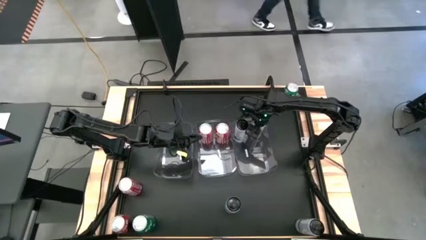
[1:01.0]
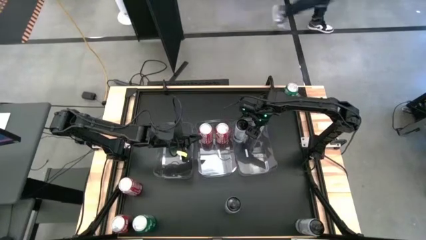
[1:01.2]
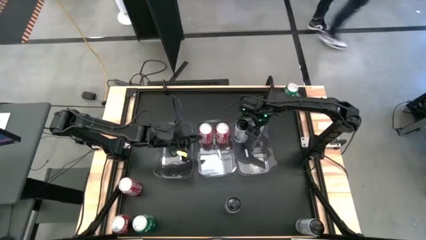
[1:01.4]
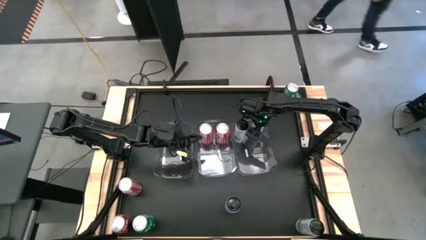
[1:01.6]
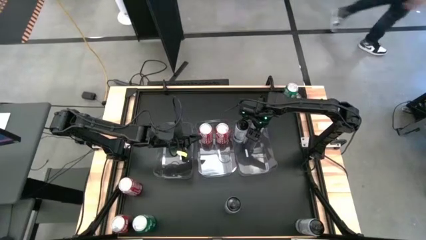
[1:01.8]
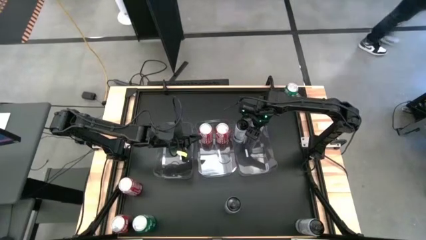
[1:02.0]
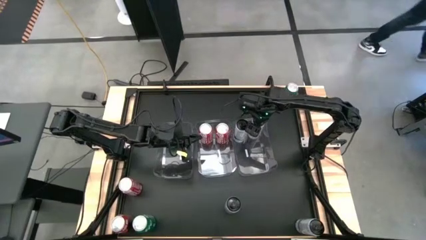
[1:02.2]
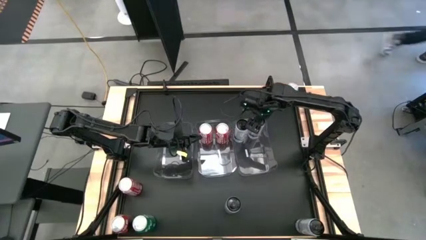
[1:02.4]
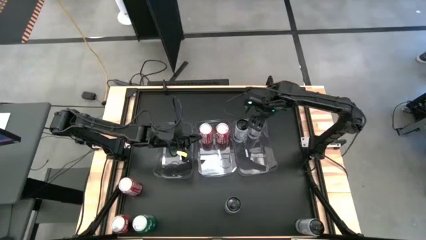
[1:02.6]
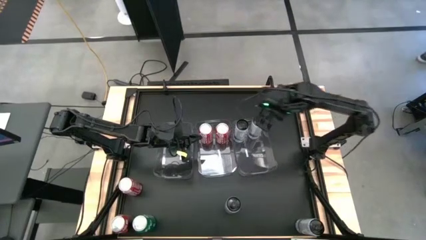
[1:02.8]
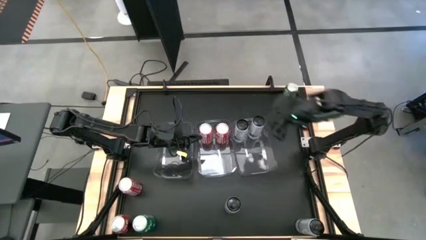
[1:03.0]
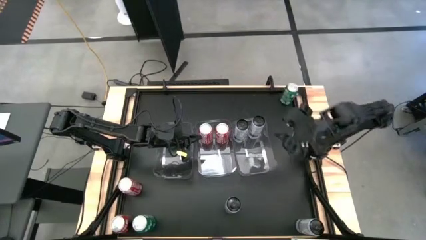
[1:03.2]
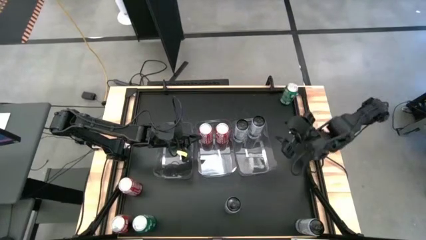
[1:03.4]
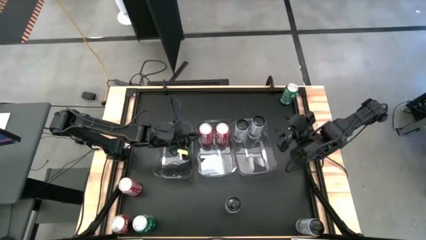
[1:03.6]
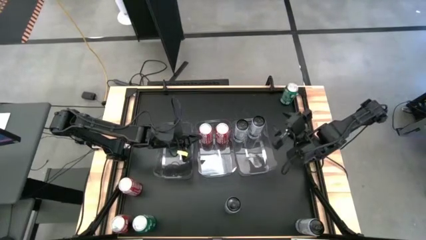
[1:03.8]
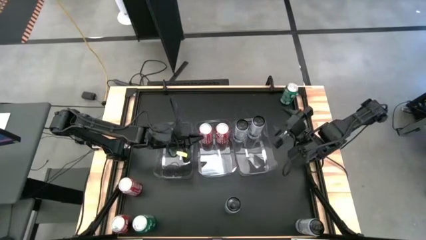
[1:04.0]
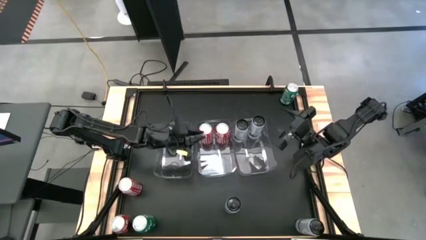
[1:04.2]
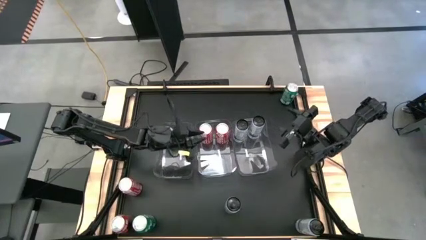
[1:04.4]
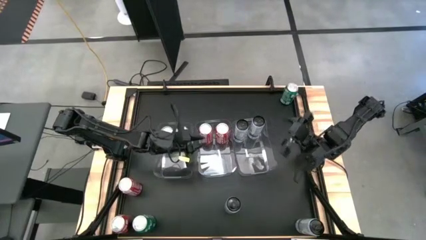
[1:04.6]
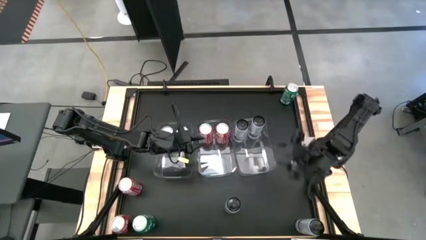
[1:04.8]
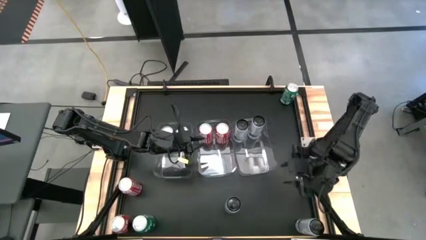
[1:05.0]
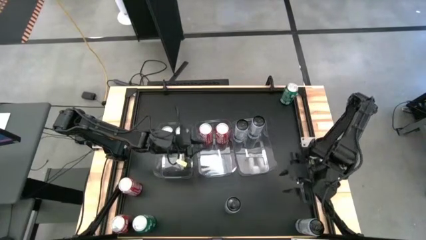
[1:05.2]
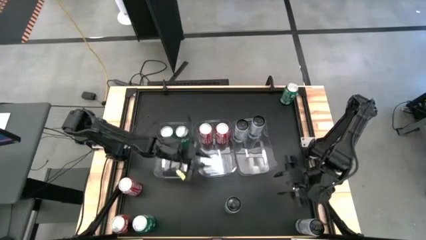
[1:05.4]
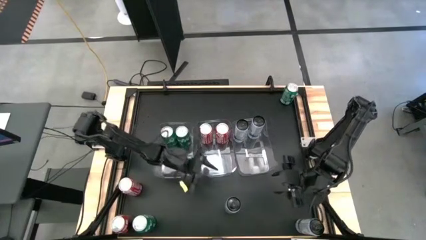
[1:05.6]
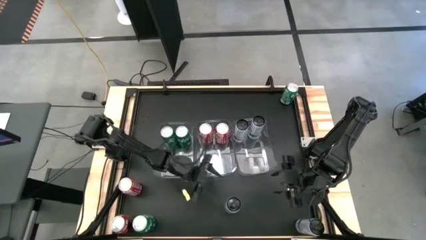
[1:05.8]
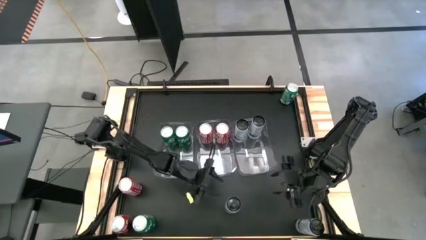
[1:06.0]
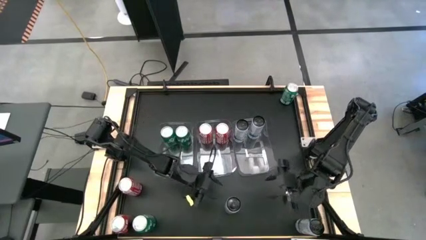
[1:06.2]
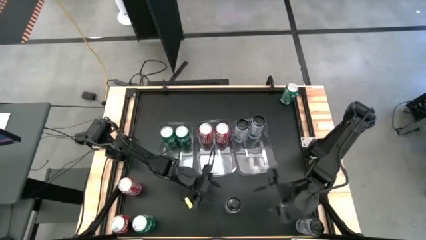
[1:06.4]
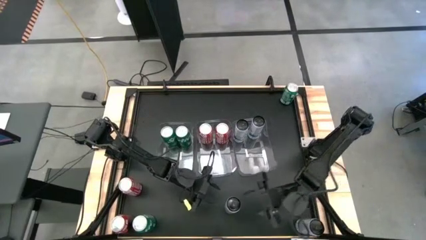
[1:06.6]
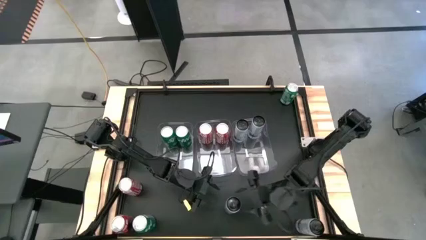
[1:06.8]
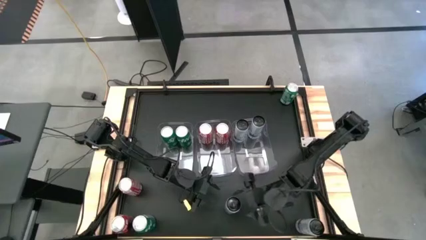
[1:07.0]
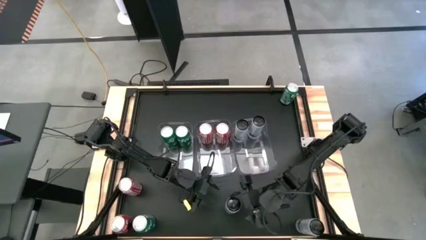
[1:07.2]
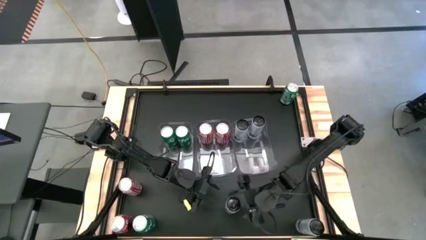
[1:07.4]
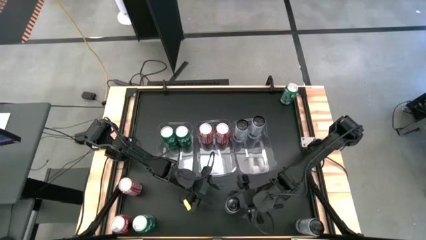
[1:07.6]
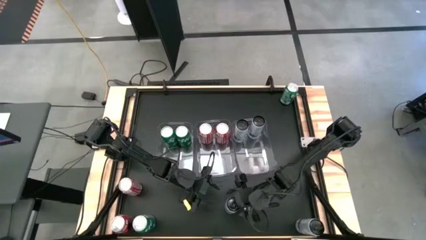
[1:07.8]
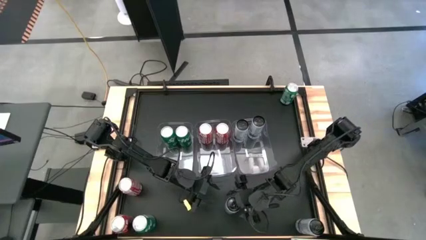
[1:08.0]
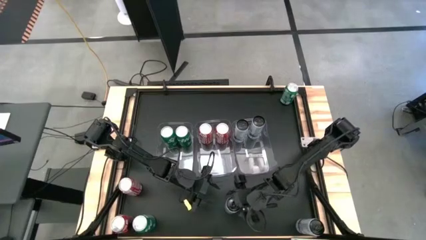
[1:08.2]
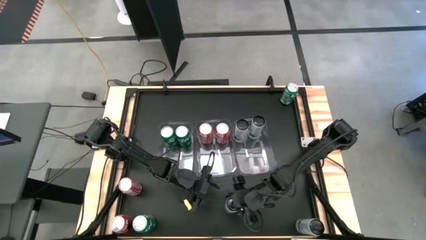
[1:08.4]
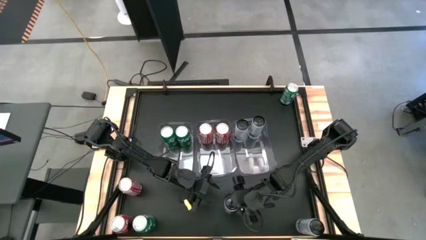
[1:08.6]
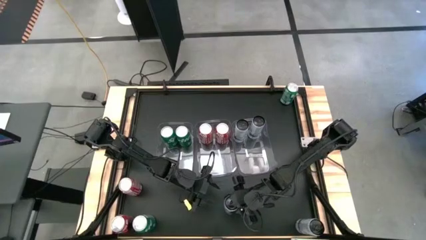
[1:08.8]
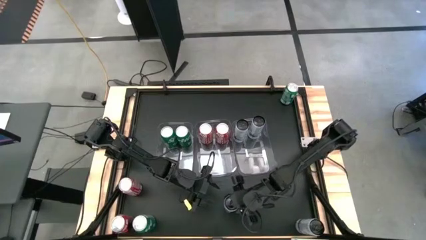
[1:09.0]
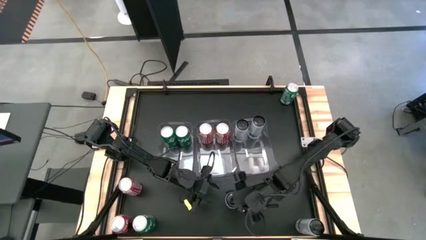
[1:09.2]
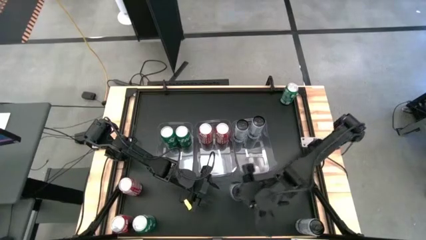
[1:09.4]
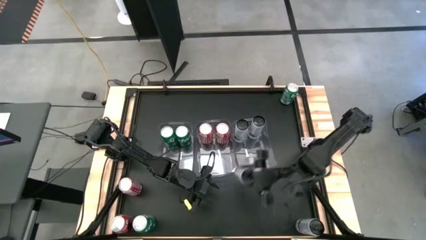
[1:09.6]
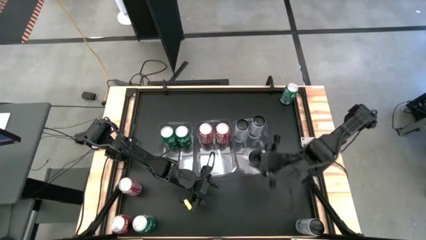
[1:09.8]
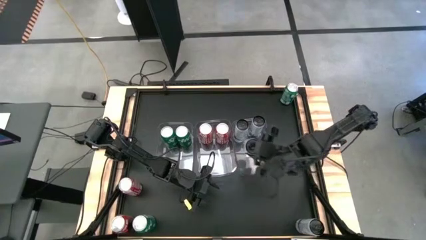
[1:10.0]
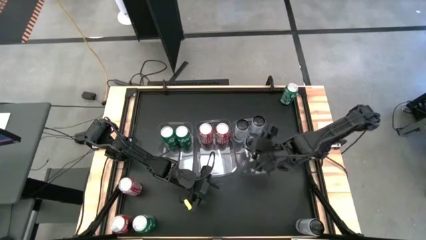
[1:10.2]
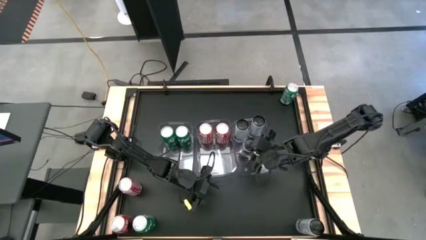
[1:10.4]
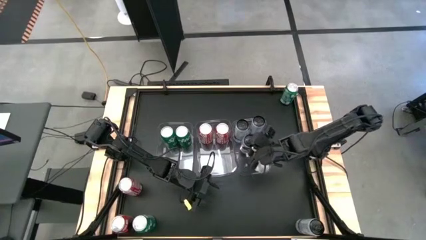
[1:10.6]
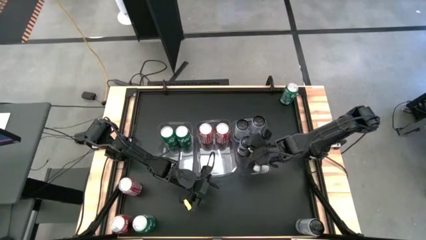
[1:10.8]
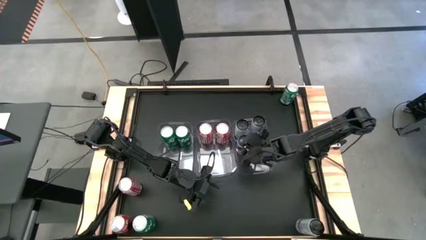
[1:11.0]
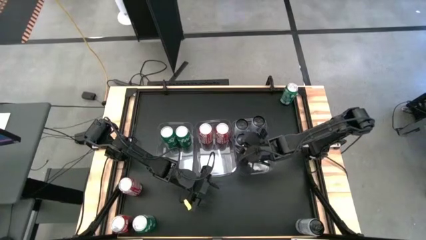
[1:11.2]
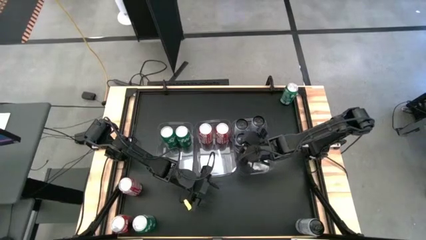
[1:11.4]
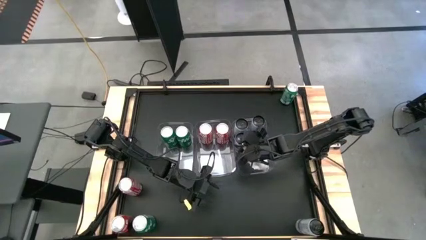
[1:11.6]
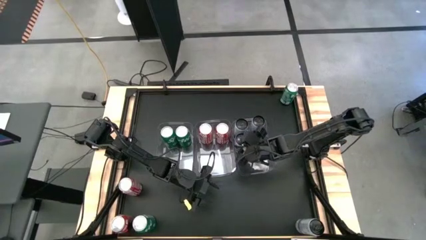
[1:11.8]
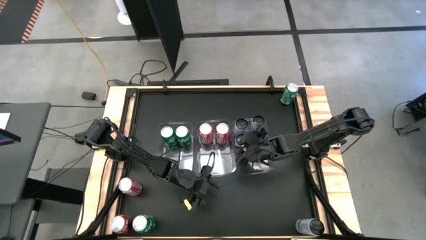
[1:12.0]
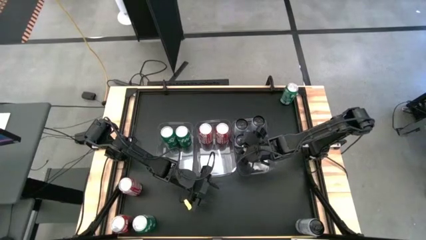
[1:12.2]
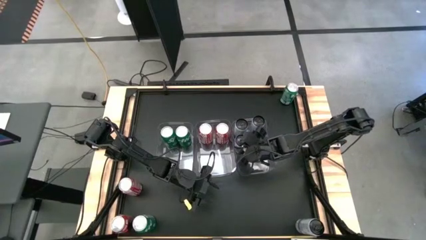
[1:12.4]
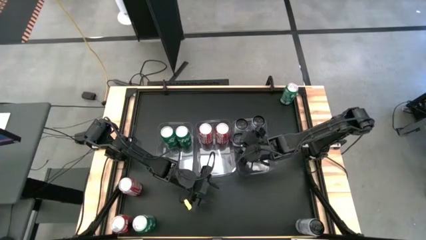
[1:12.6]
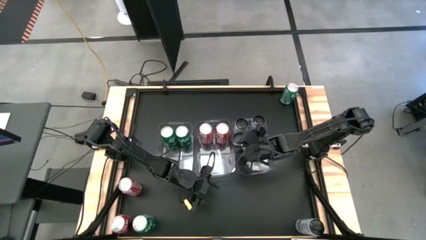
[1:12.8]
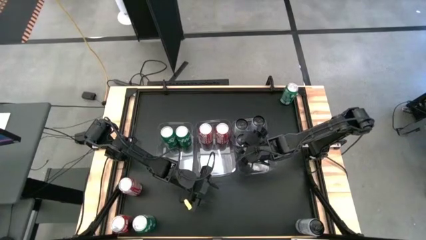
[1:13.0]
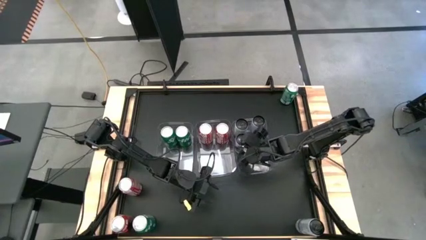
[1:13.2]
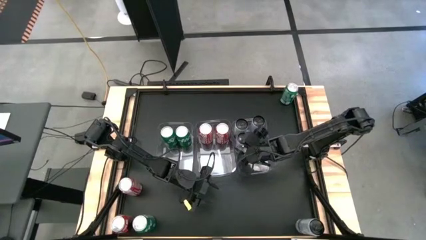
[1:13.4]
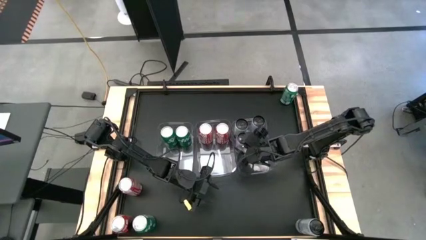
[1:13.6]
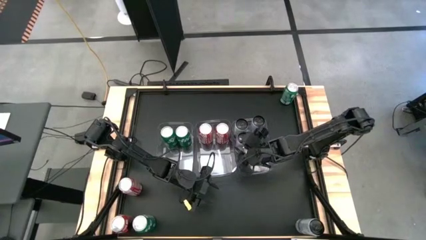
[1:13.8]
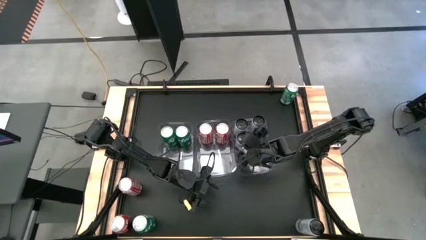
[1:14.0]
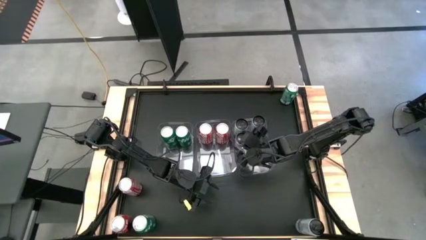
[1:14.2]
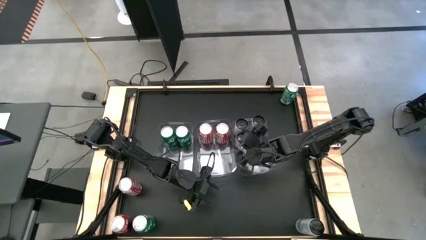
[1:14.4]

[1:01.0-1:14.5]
Task: Sort soda cans
Put the left white-blue soda can into the right transparent bin
